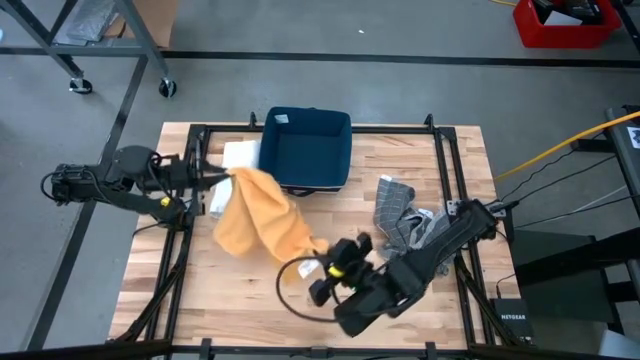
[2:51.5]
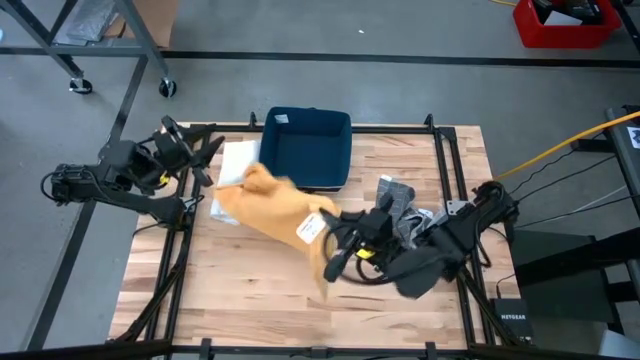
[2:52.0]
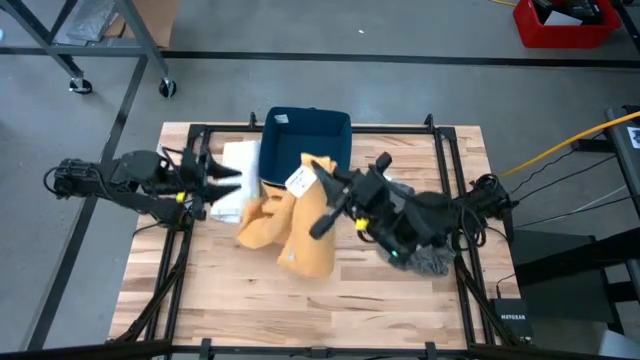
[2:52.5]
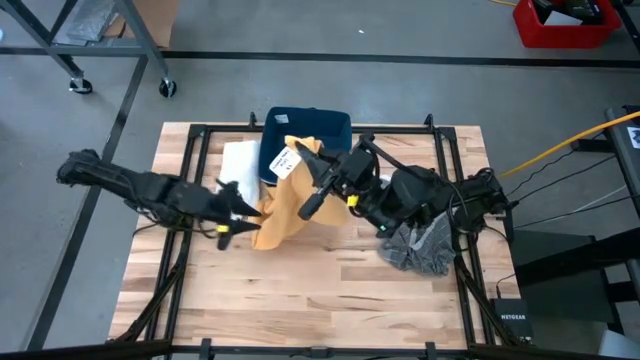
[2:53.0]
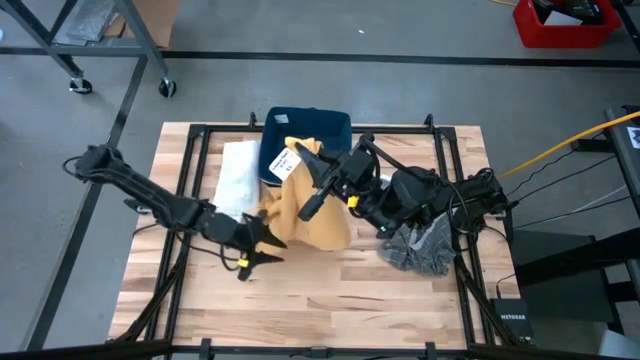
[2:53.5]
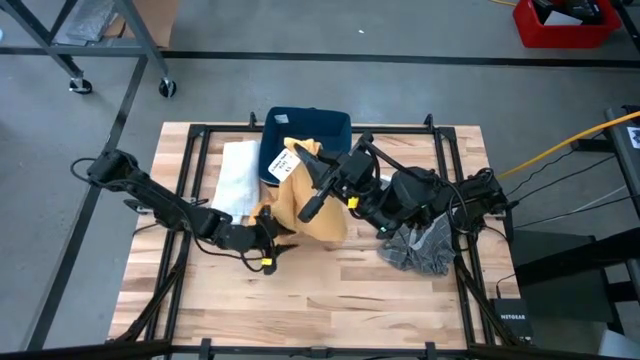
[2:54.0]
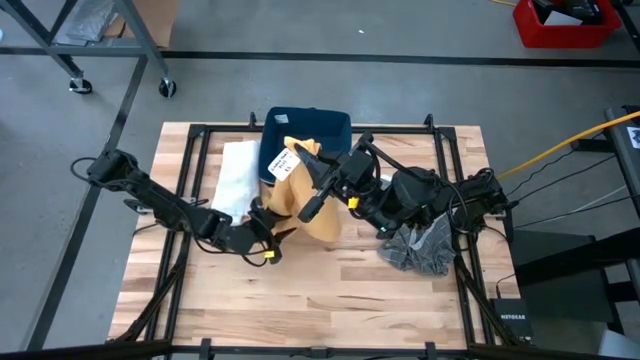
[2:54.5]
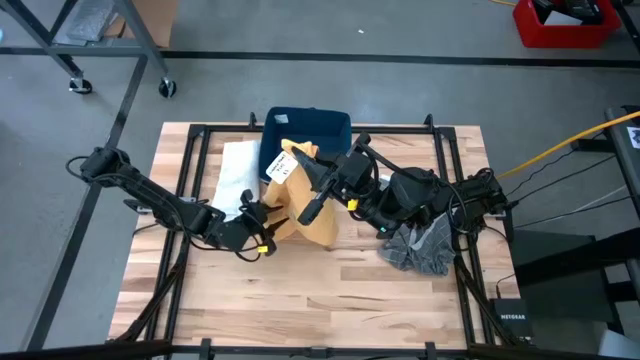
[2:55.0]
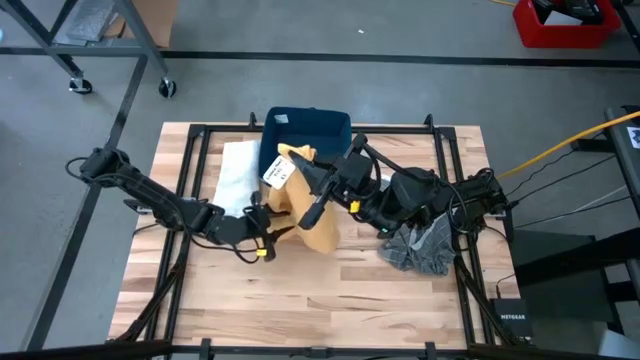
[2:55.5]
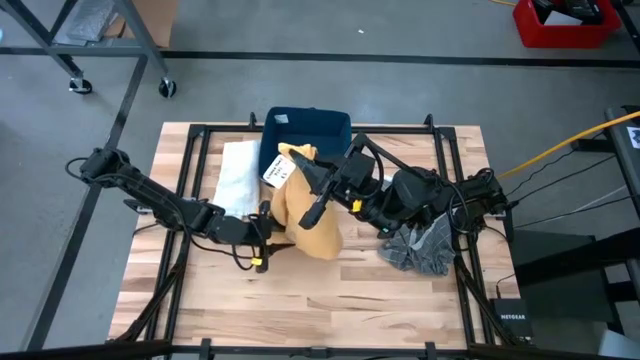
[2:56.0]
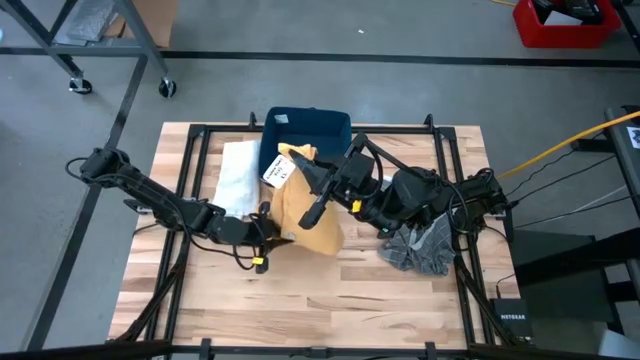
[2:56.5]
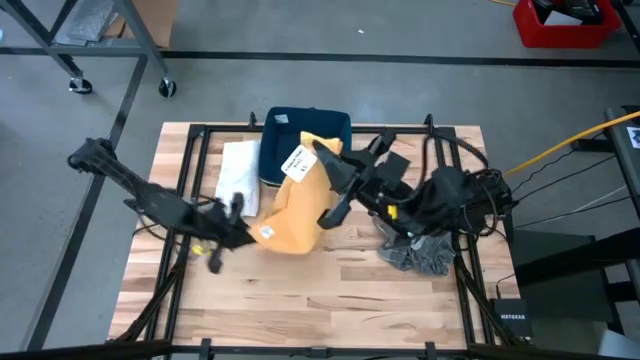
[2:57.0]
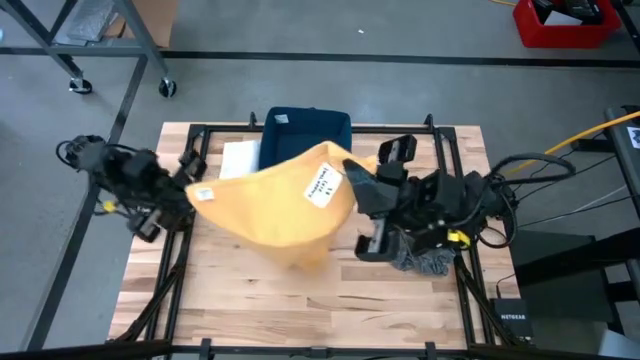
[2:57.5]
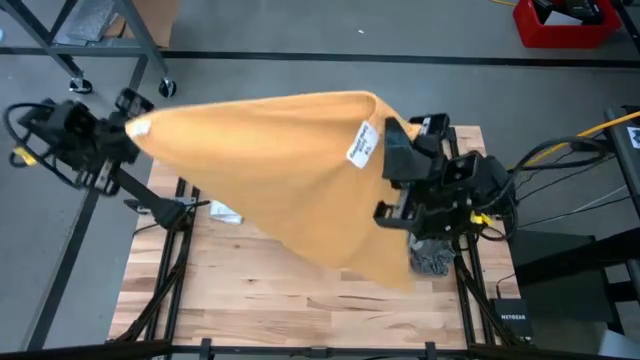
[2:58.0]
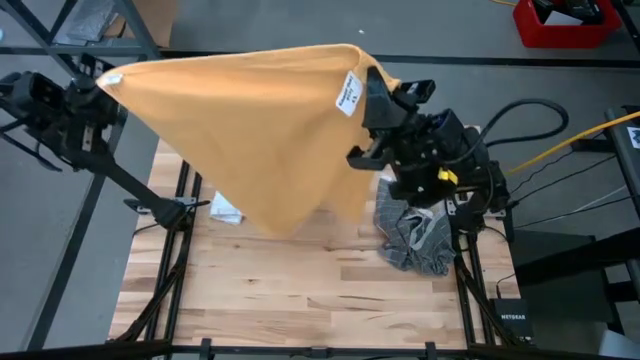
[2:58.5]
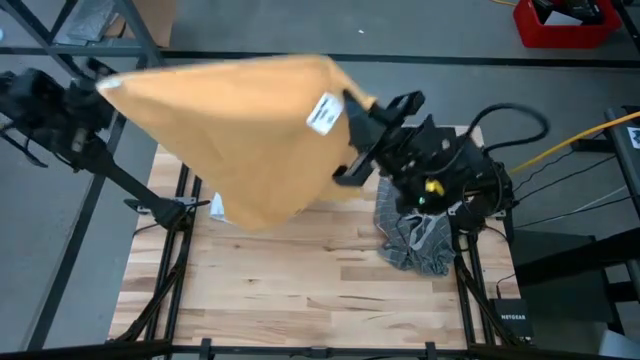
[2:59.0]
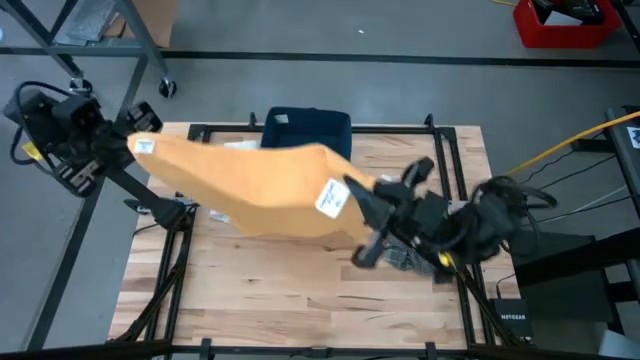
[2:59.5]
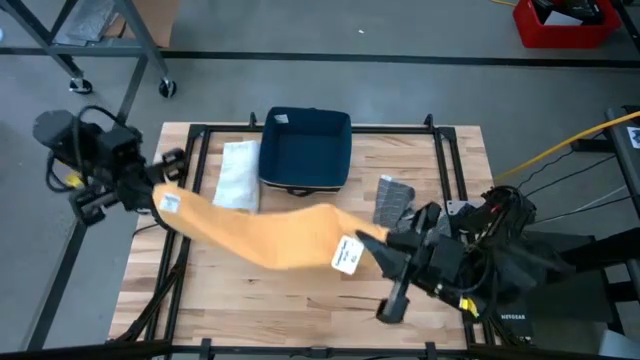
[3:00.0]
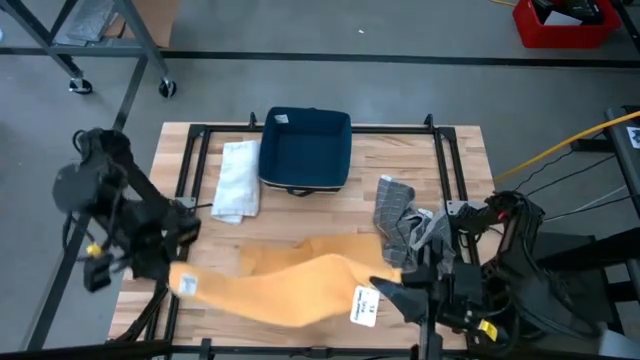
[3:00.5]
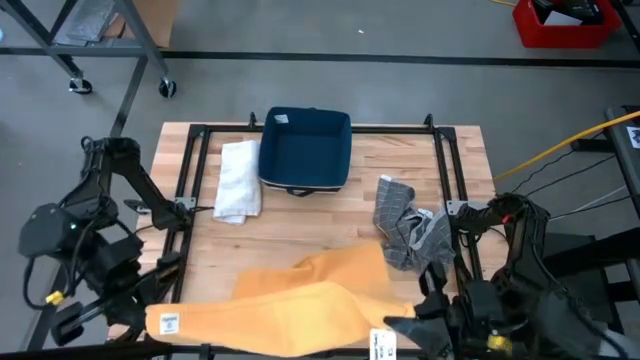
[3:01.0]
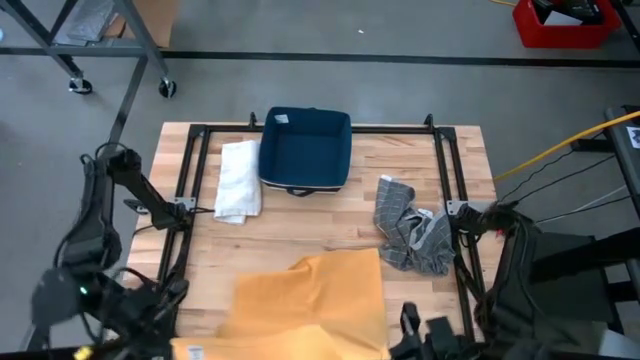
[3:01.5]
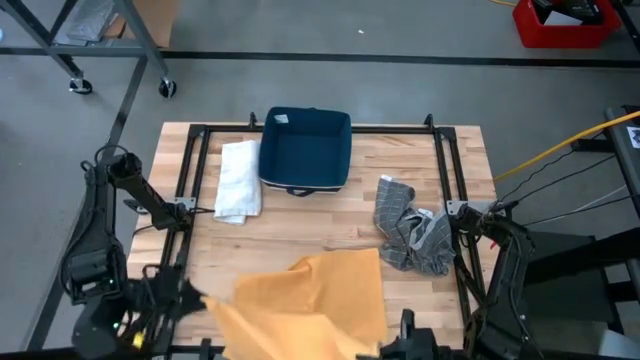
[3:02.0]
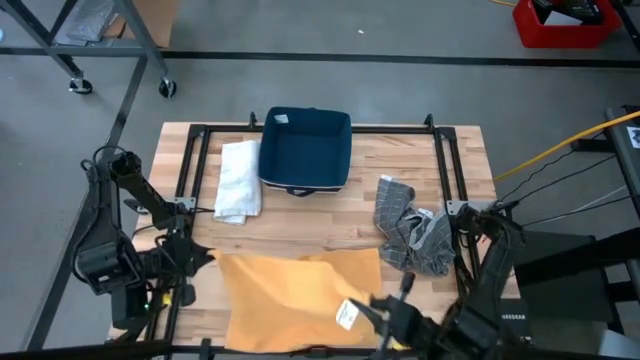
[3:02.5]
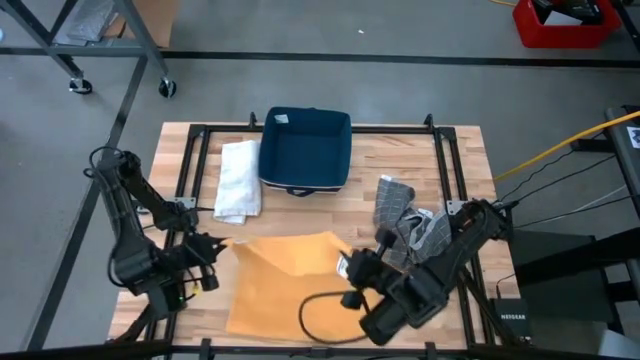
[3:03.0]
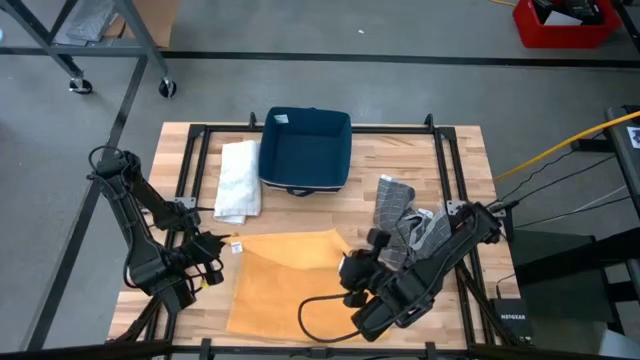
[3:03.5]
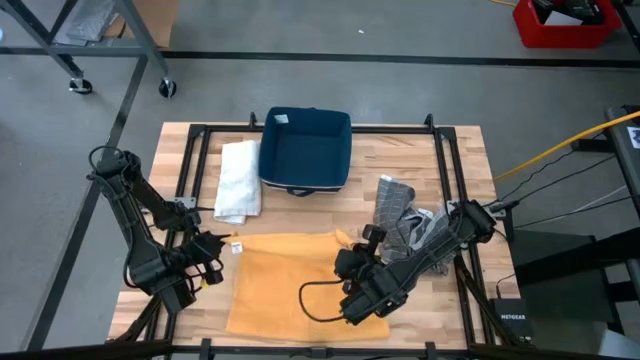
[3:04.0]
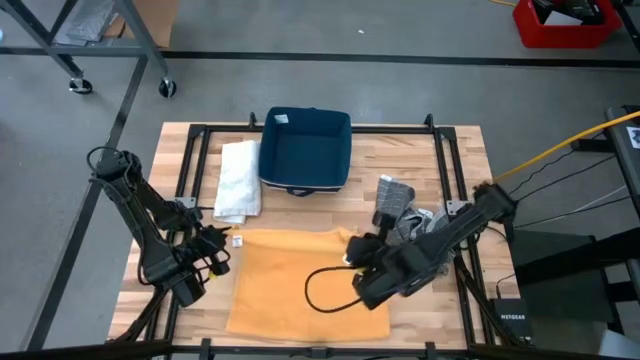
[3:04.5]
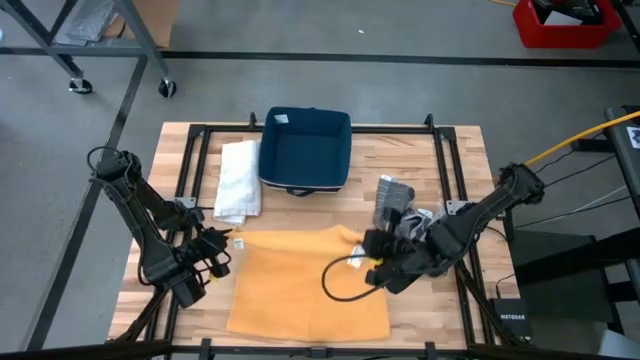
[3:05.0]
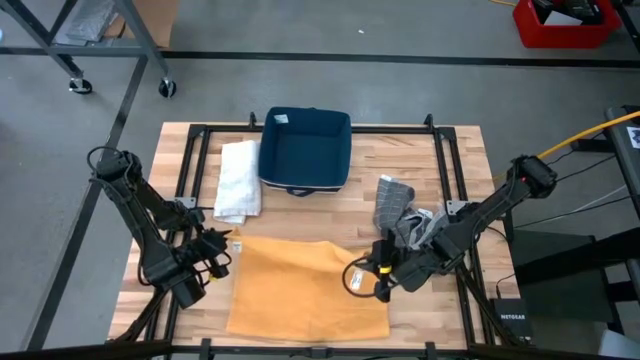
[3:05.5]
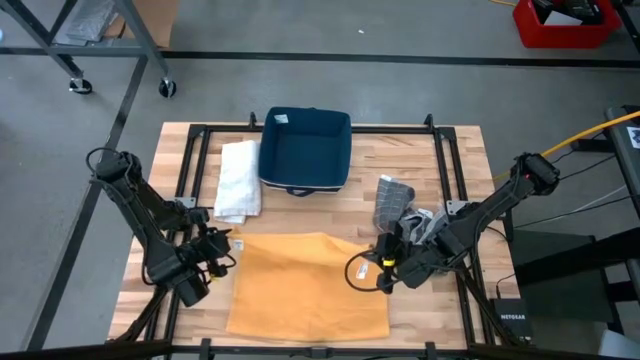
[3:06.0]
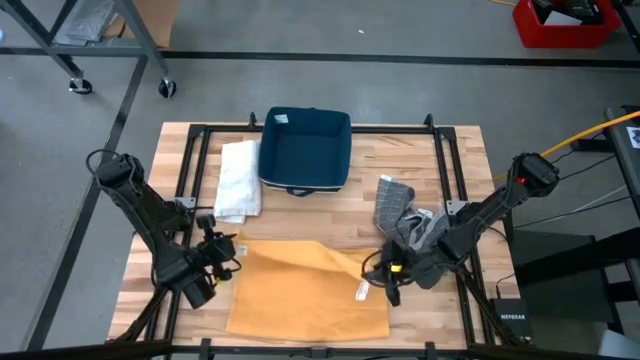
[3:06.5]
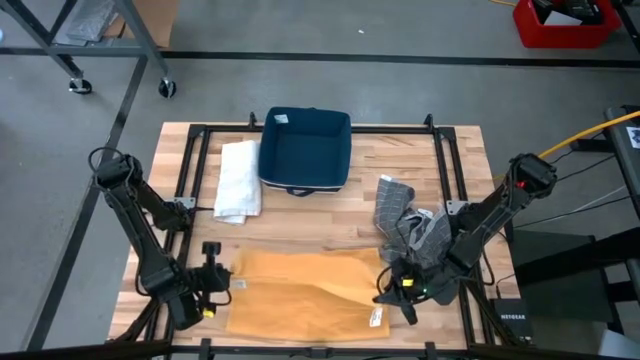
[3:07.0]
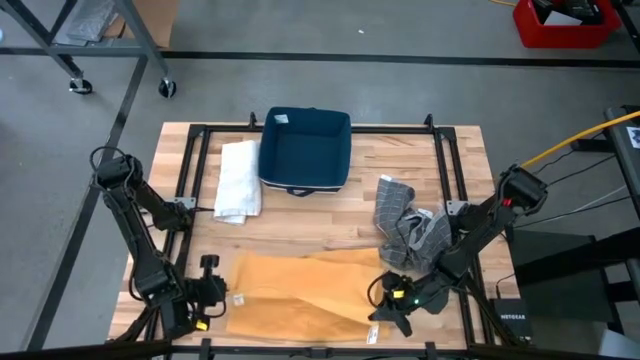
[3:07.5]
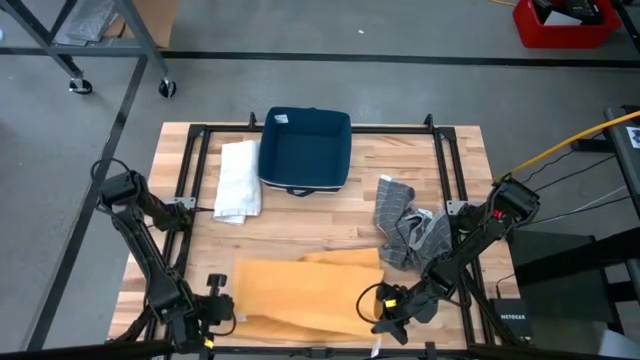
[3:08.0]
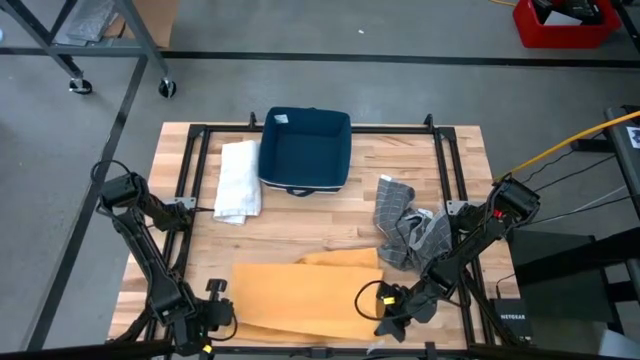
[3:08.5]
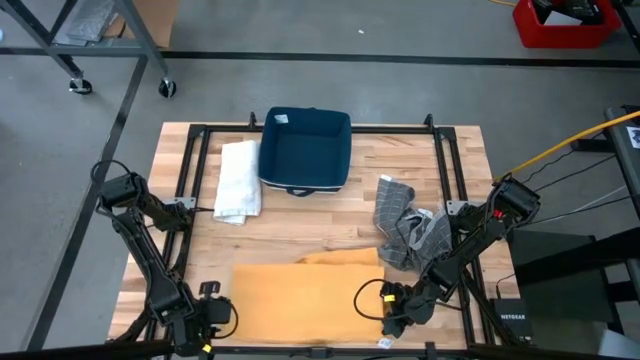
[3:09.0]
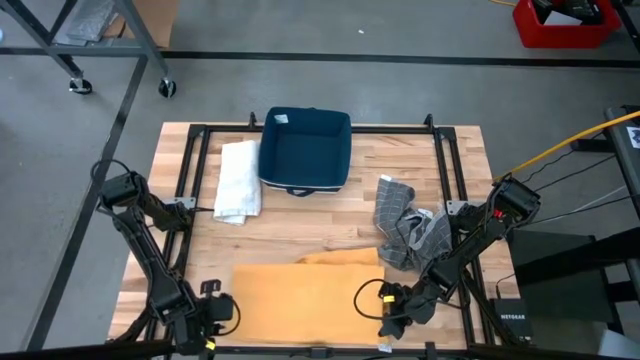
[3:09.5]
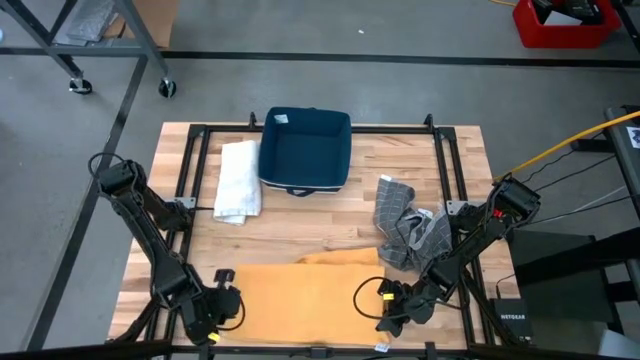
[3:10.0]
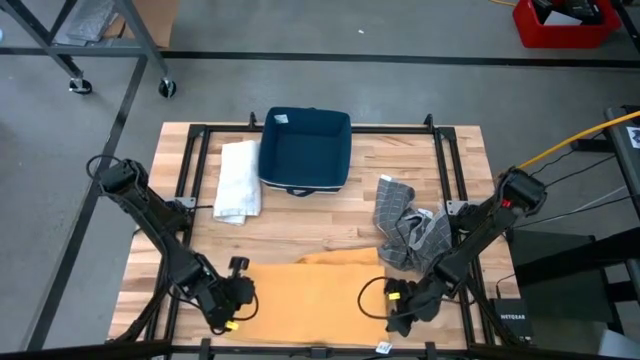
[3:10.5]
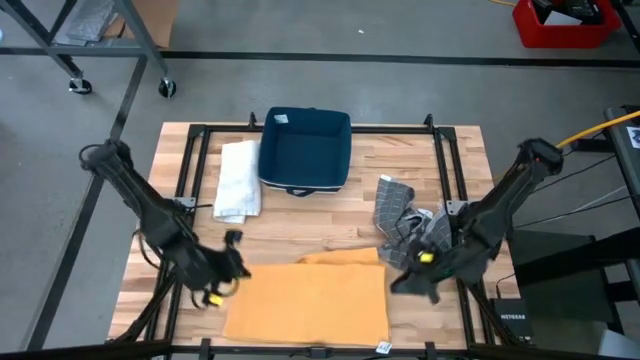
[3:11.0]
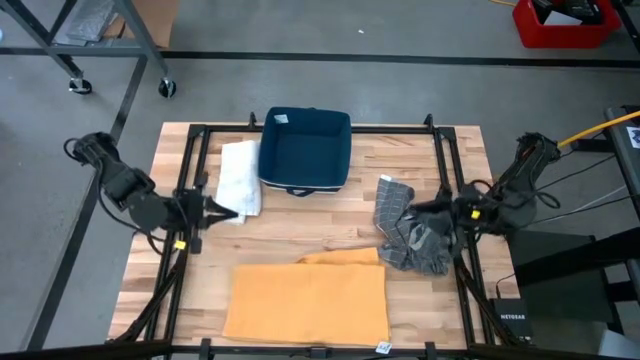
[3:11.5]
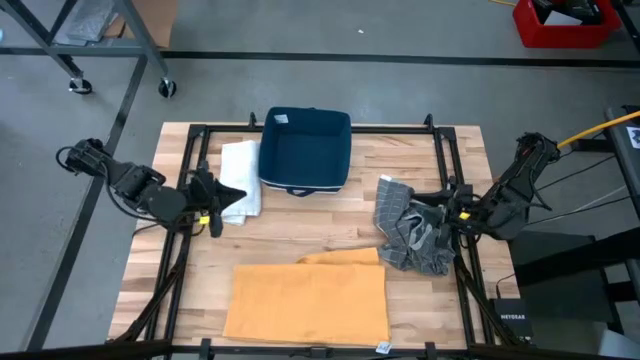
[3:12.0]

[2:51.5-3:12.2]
Task: Fold towel
Fold the yellow towel
